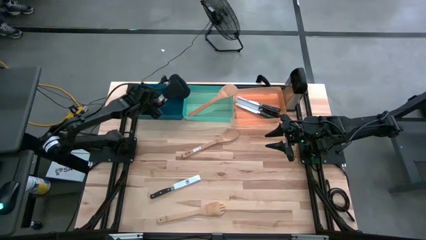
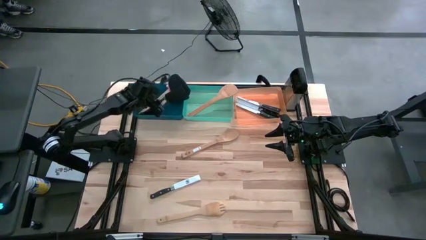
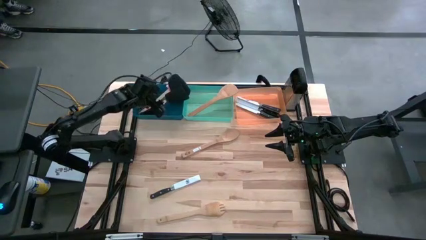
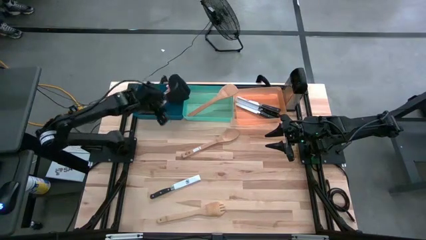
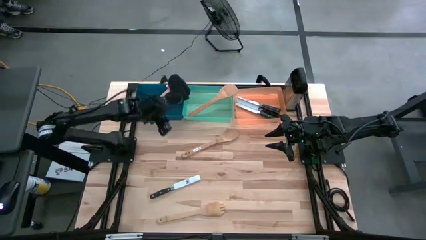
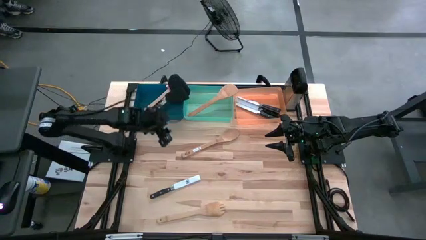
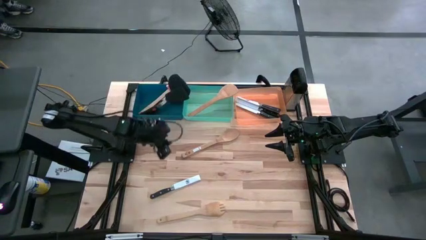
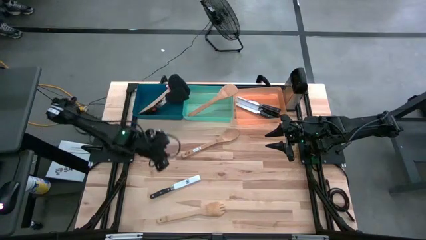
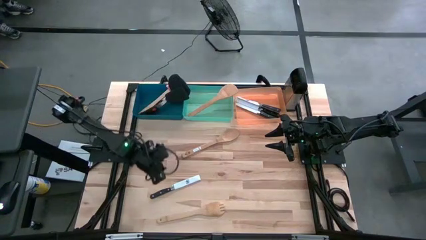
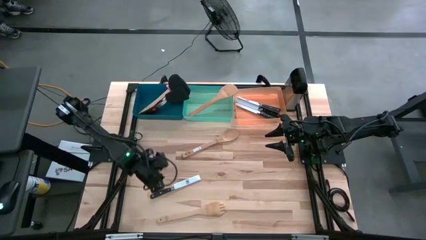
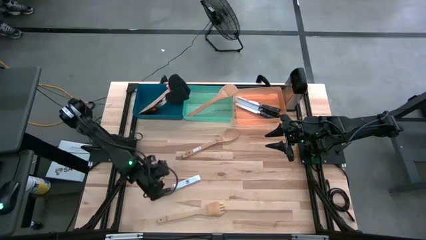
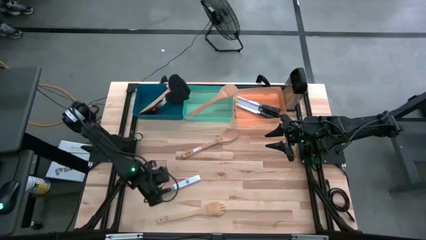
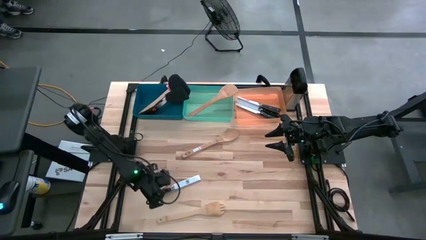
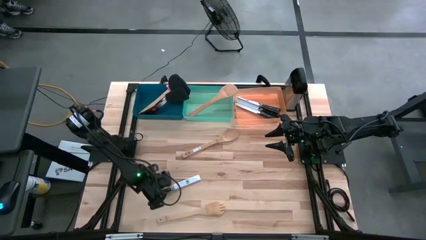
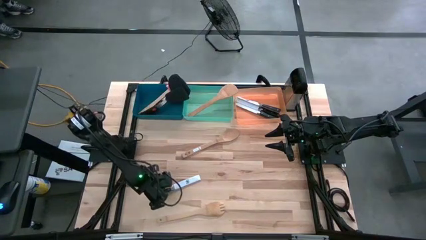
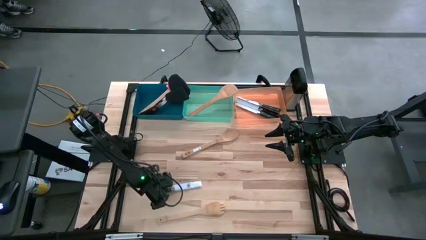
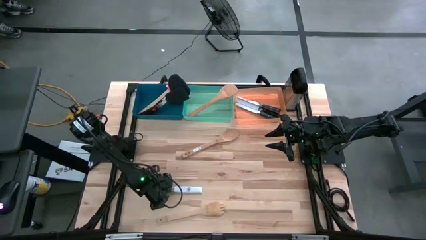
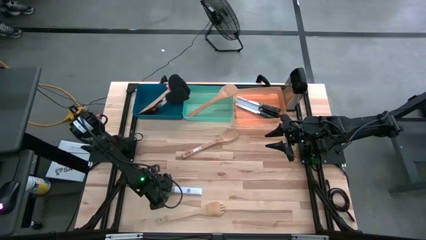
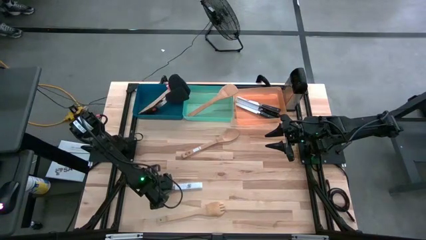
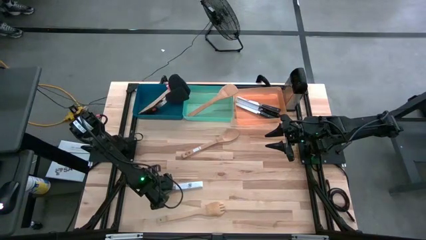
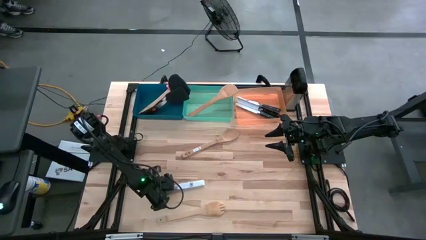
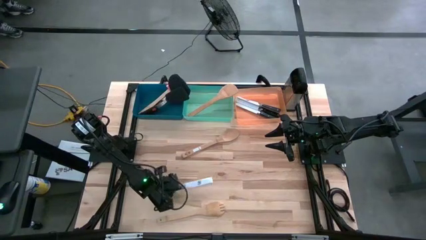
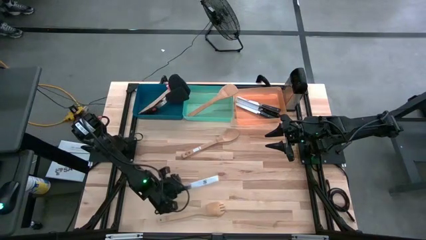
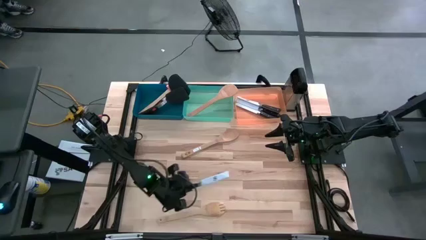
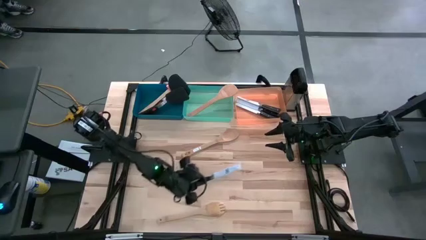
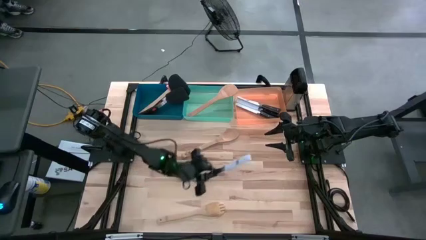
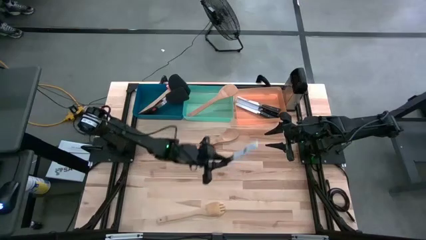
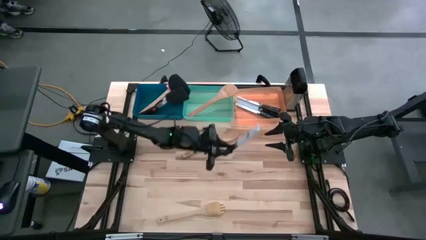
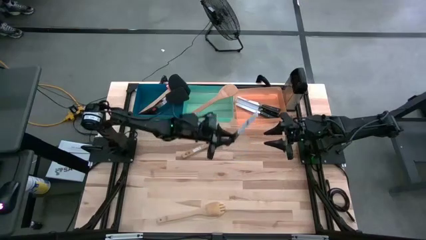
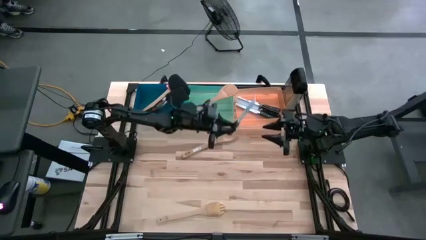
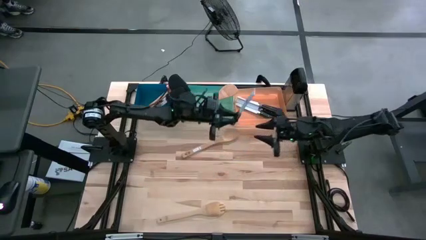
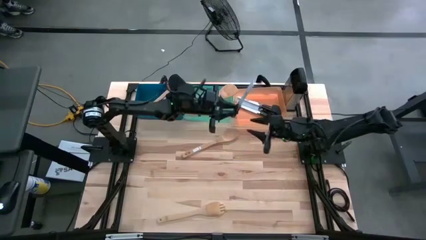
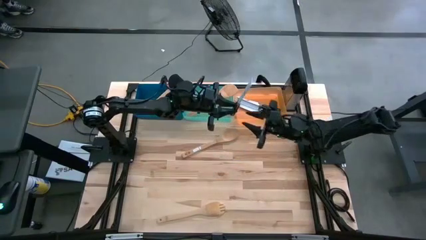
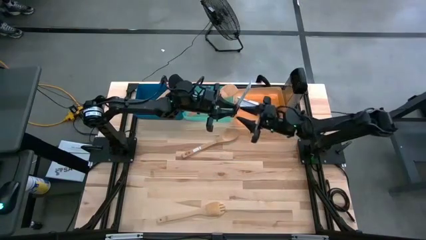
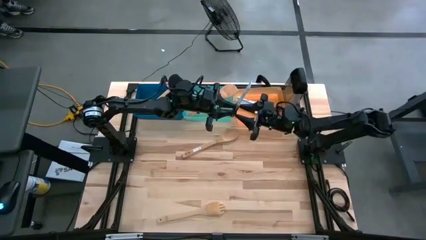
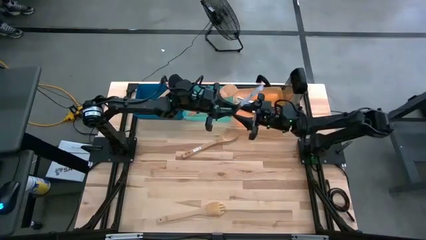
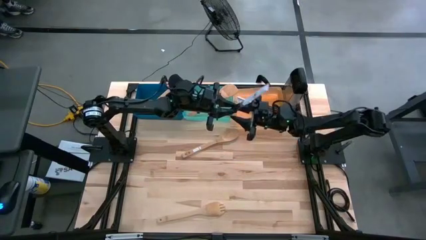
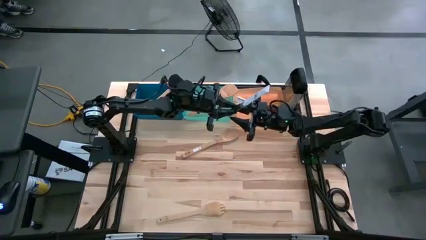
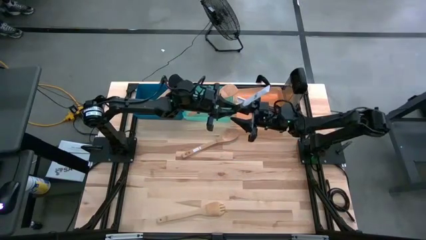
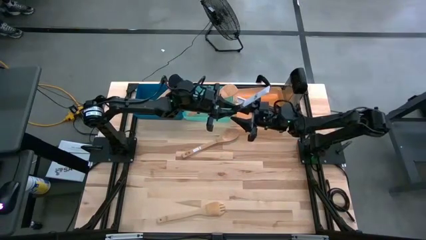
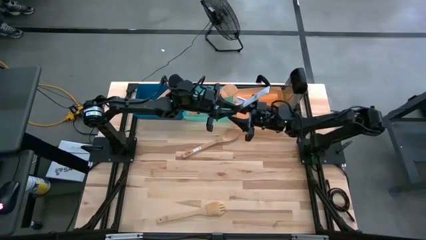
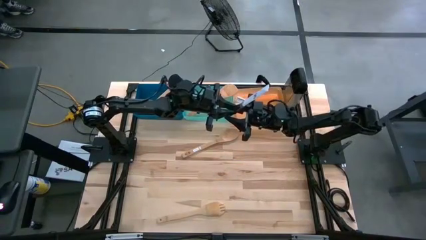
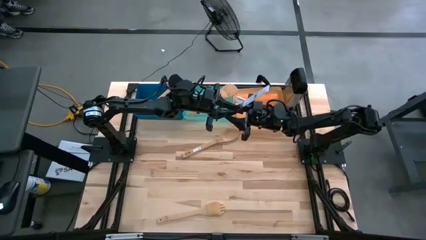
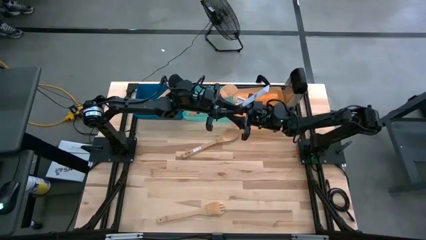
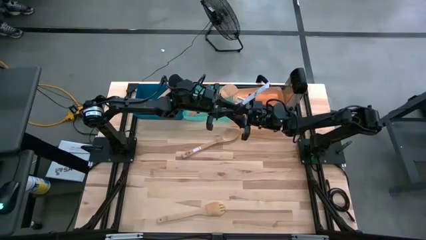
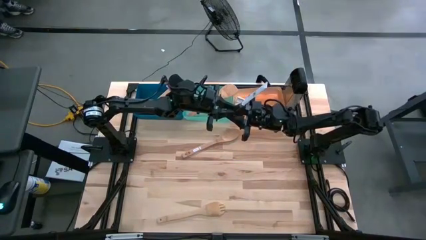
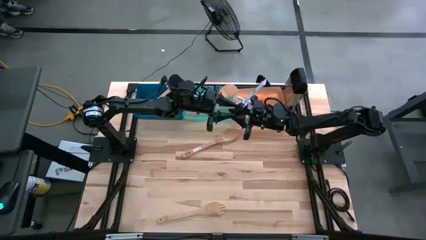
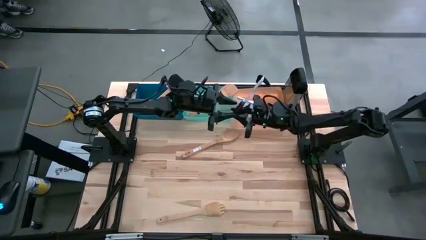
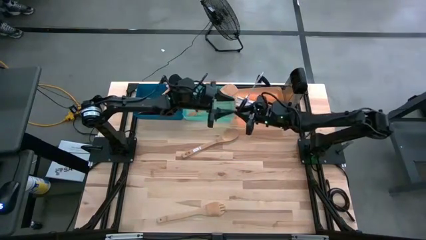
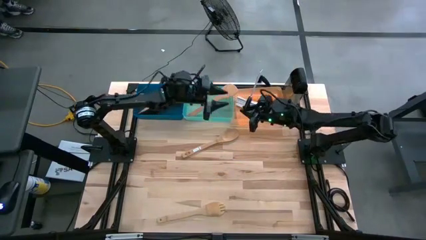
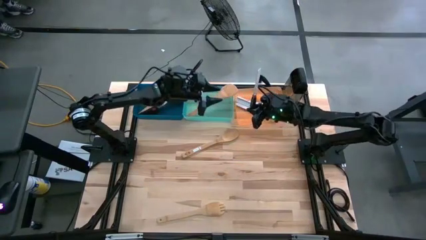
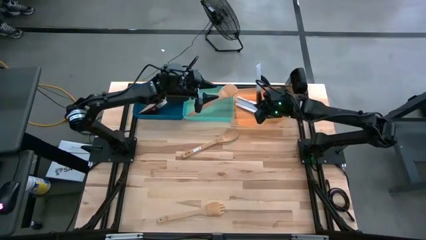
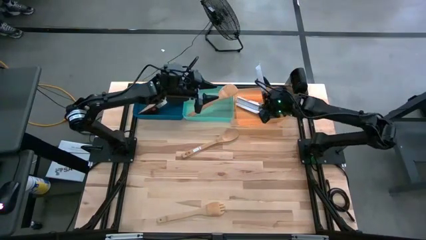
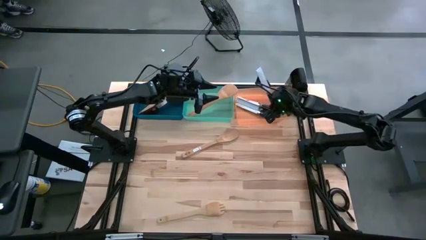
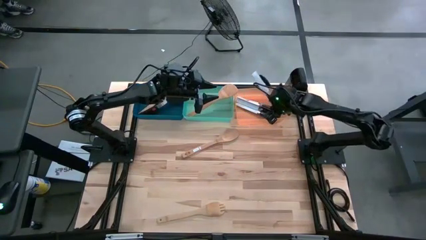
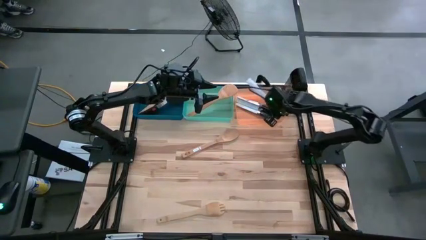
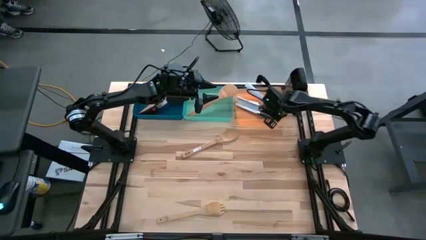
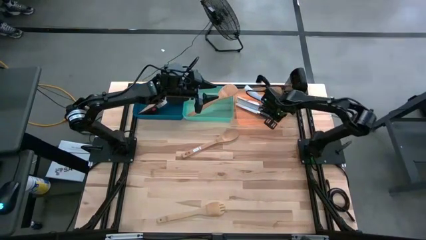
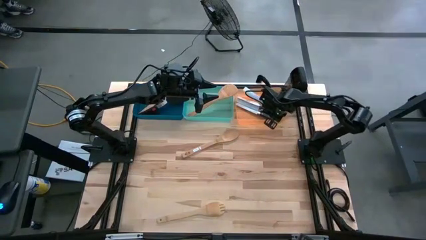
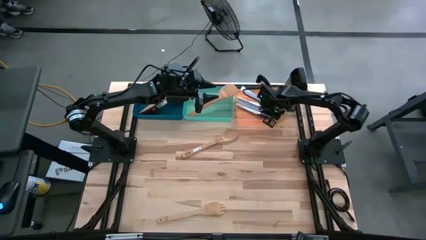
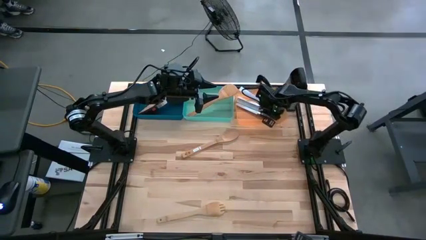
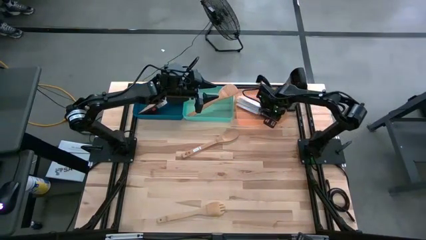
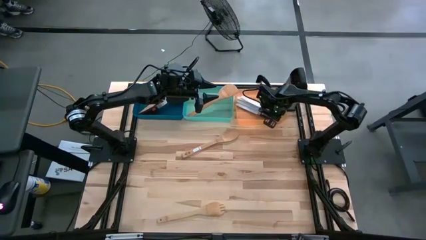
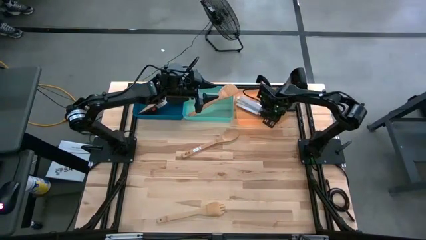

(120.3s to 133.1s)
Task: Pick & Place Kitchen Items
Put the knife into the orange bin

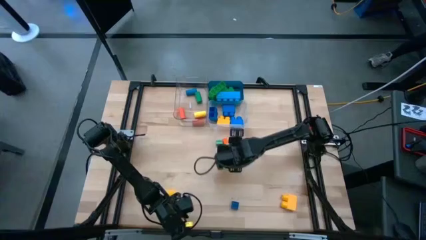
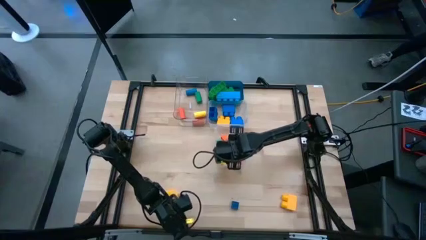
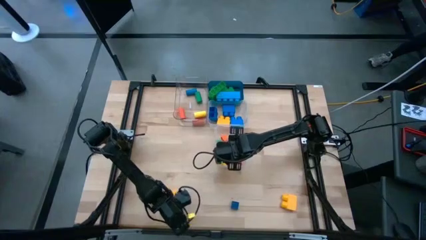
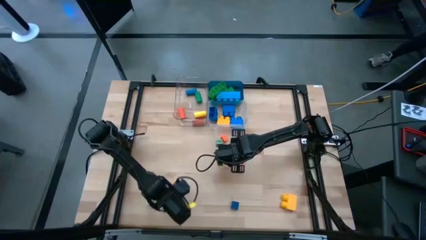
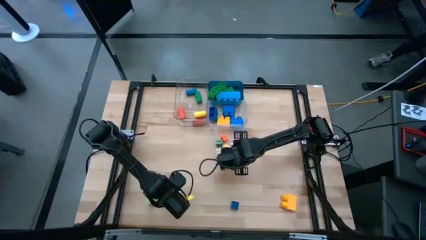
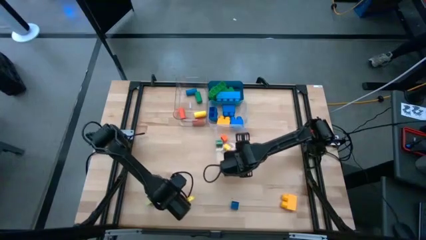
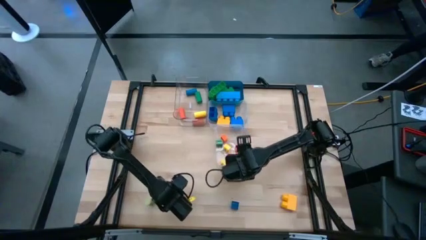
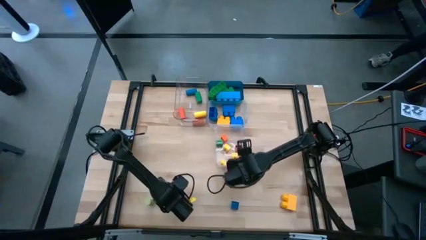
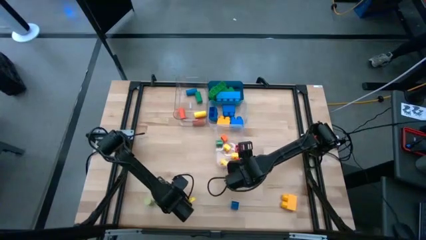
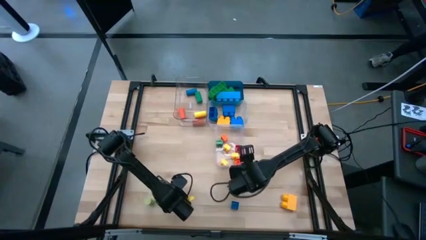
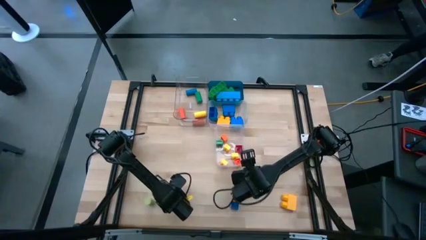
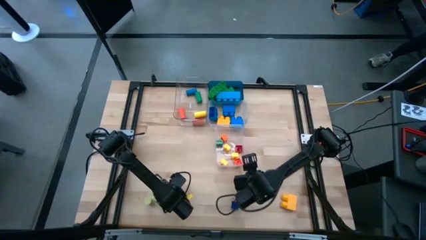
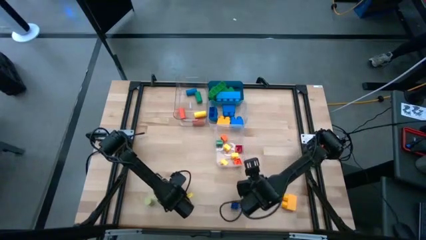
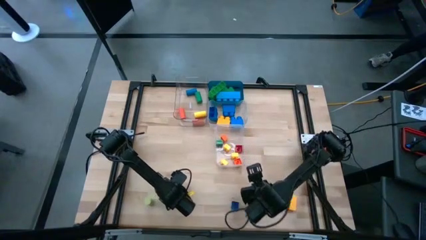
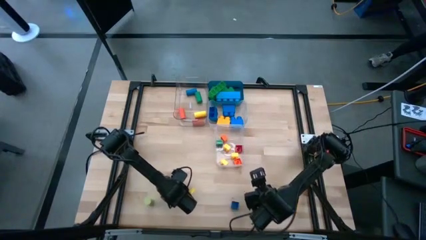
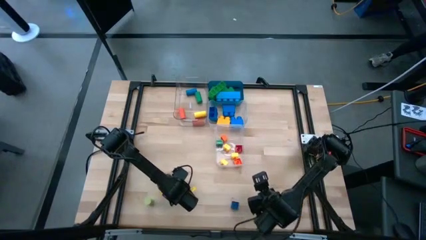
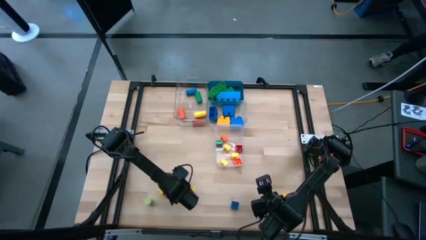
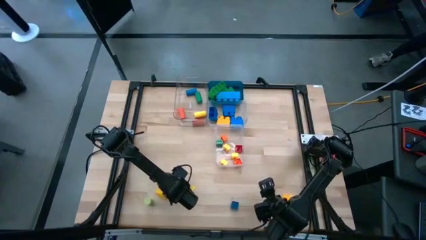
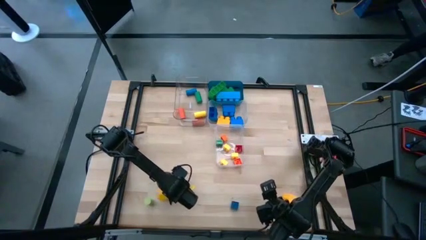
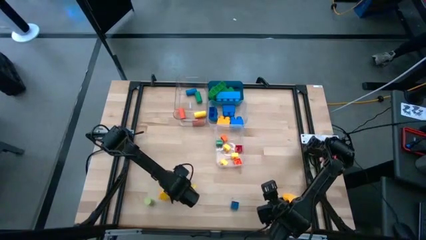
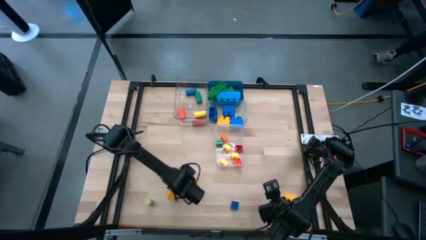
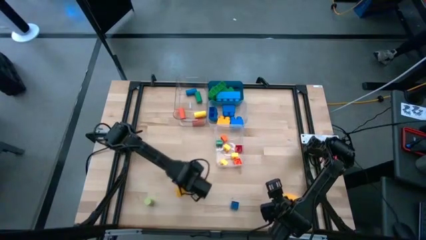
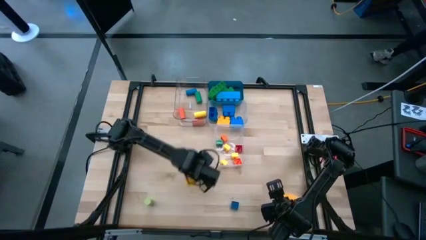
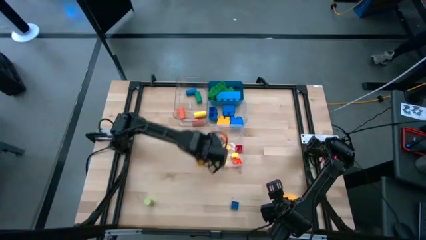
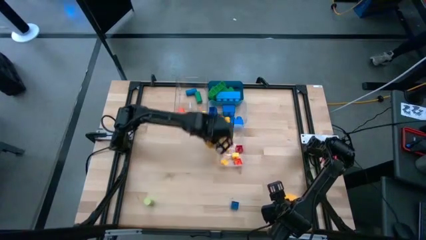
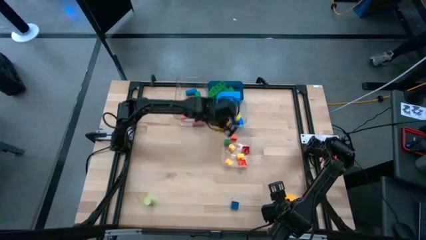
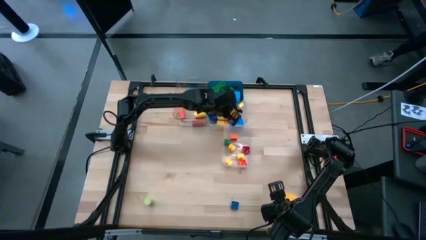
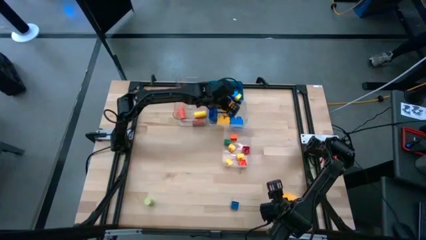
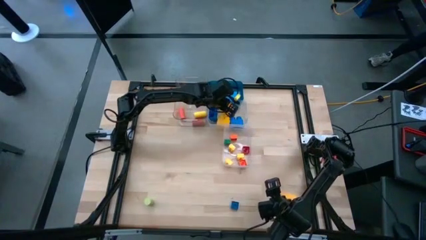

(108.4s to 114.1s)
Task: Sort blocks by size
Put the yellow 2 stud game piece into the top right transparent bin
